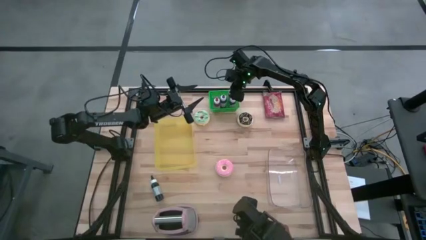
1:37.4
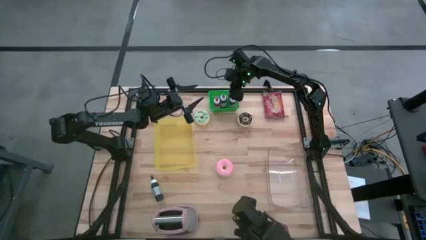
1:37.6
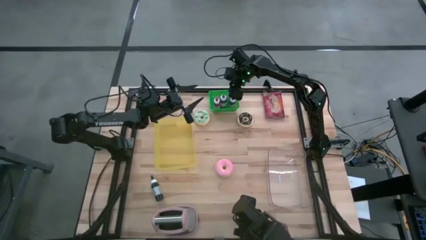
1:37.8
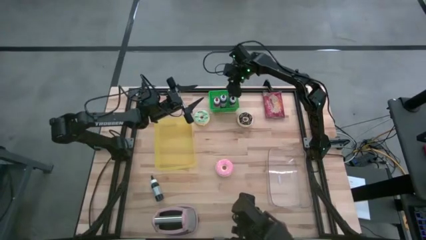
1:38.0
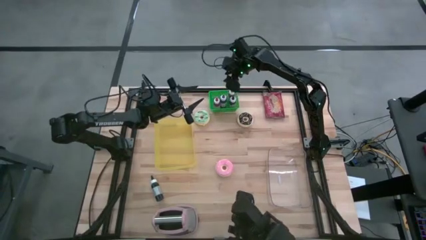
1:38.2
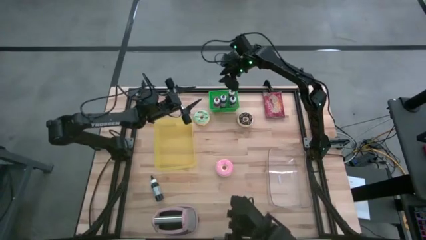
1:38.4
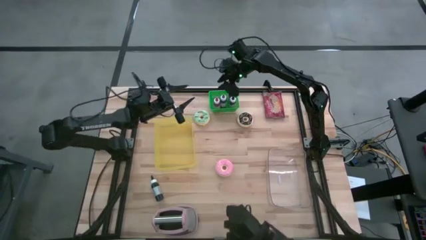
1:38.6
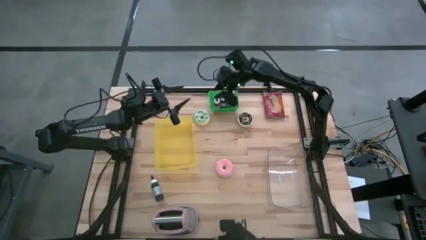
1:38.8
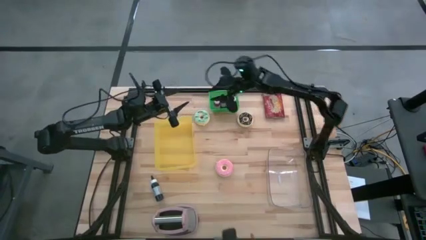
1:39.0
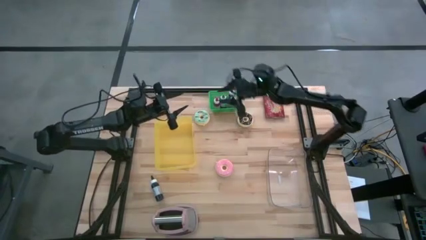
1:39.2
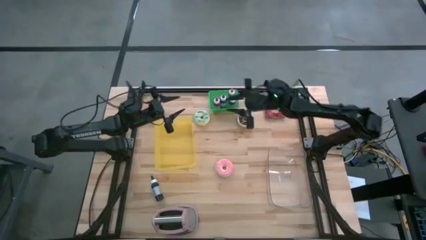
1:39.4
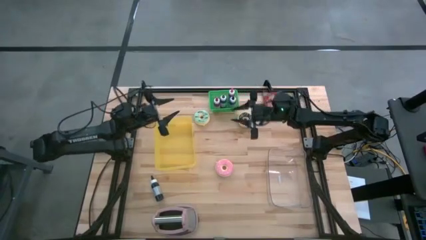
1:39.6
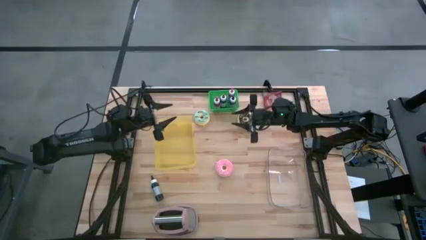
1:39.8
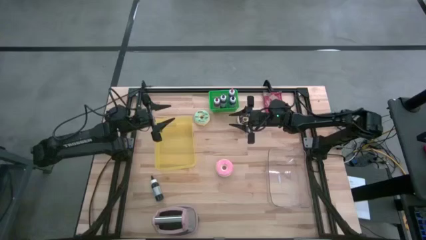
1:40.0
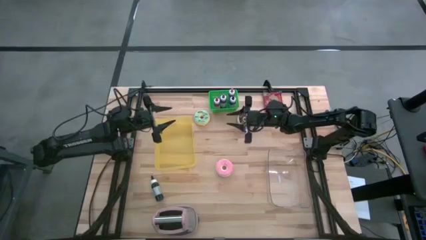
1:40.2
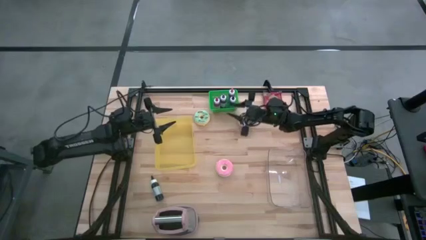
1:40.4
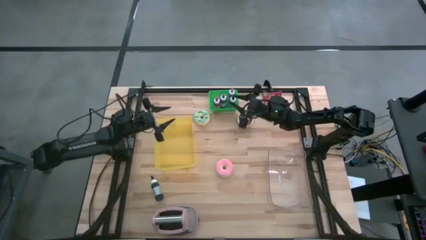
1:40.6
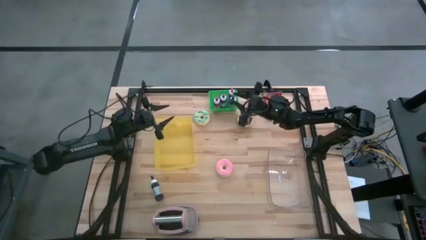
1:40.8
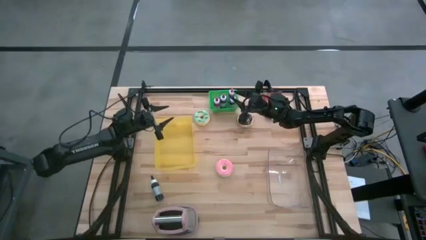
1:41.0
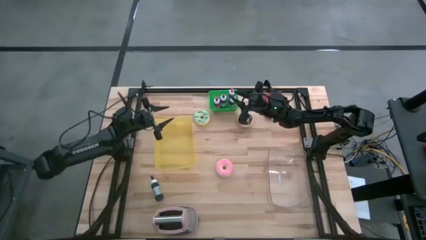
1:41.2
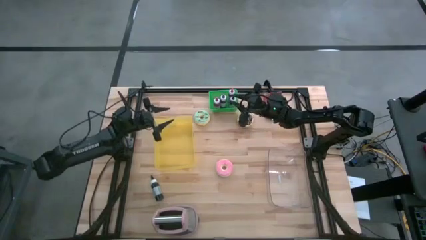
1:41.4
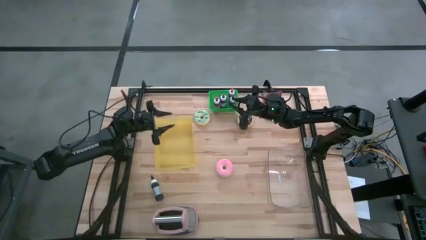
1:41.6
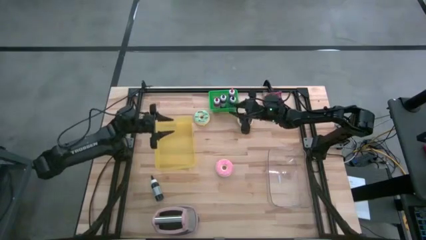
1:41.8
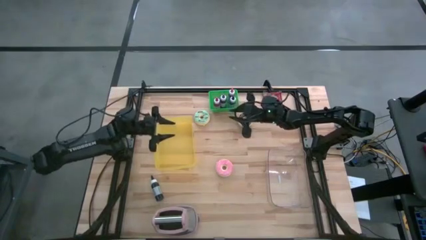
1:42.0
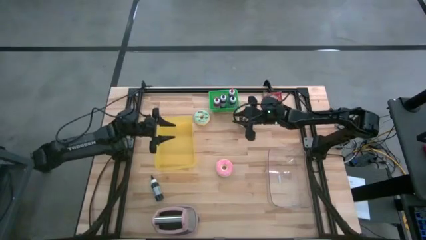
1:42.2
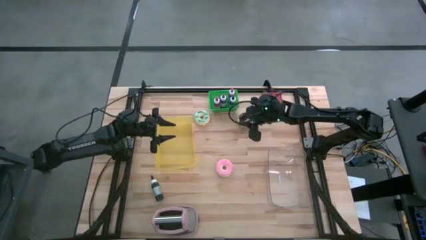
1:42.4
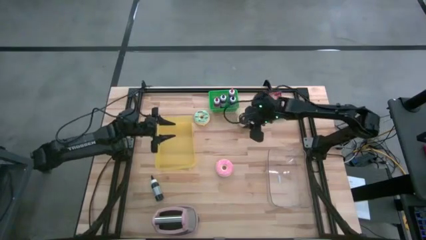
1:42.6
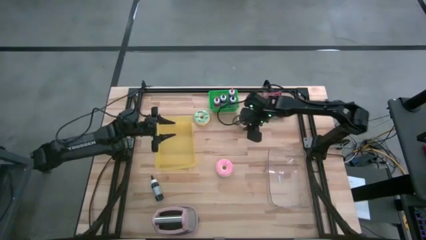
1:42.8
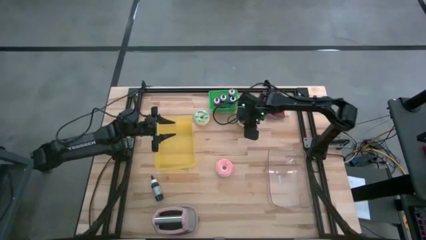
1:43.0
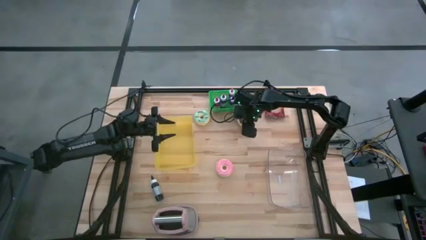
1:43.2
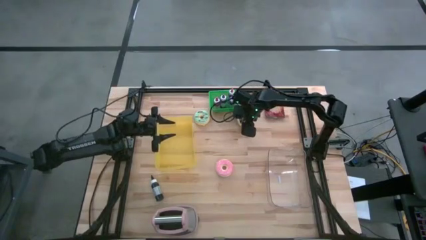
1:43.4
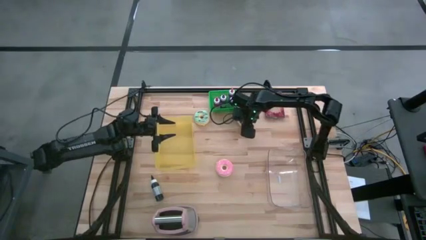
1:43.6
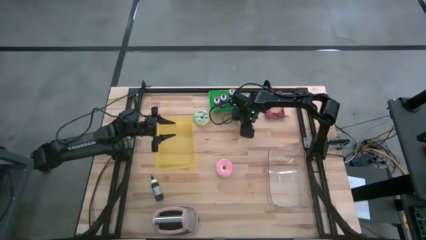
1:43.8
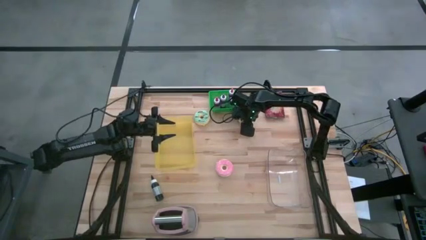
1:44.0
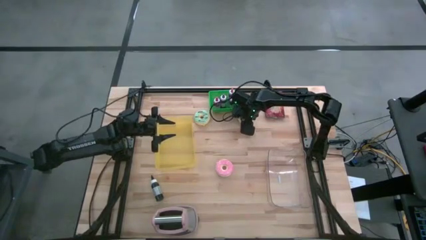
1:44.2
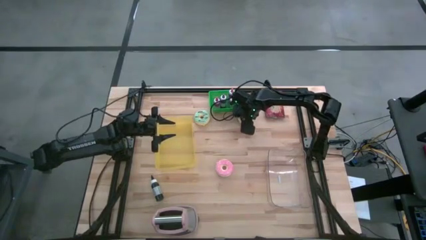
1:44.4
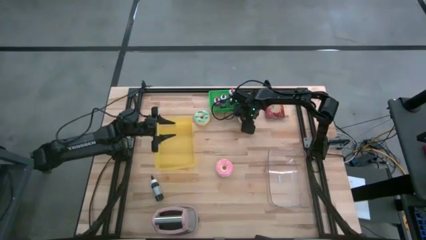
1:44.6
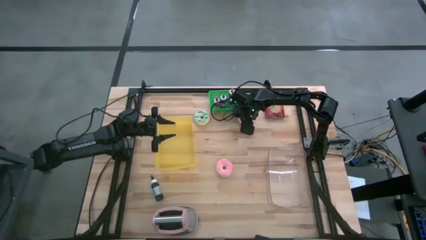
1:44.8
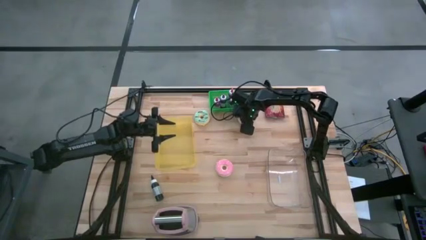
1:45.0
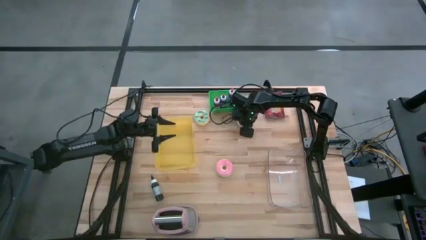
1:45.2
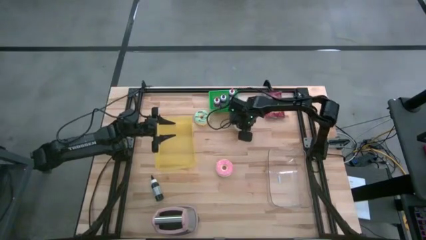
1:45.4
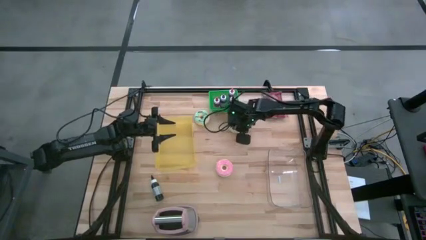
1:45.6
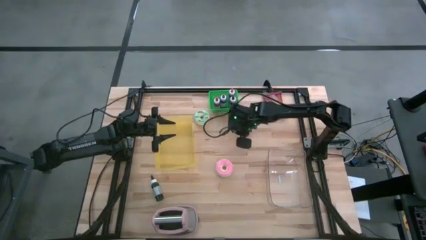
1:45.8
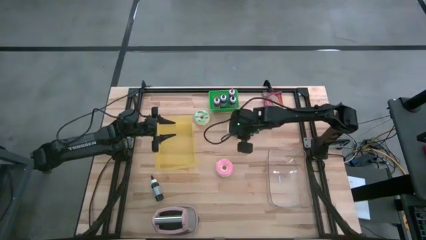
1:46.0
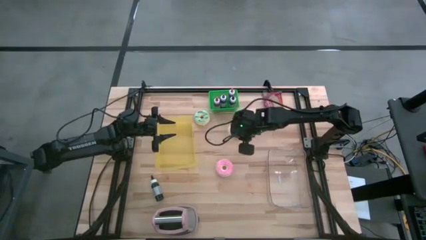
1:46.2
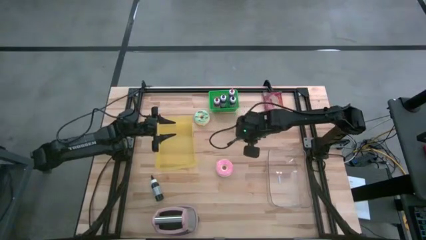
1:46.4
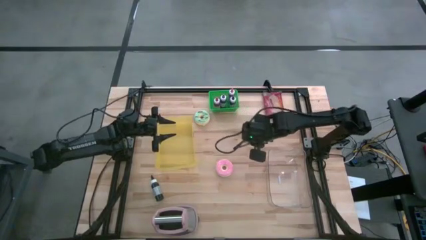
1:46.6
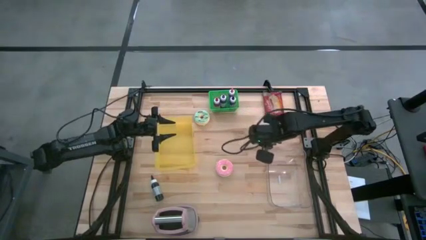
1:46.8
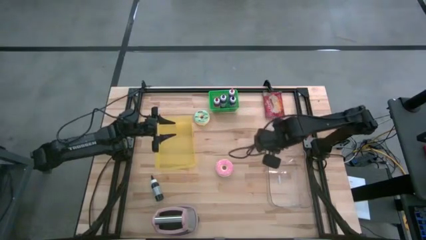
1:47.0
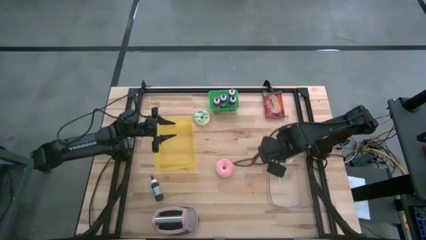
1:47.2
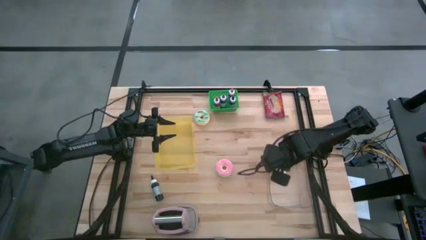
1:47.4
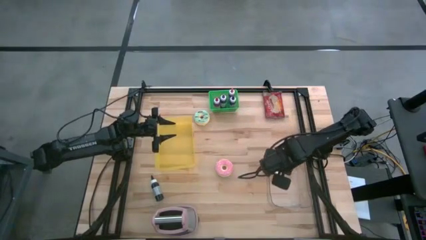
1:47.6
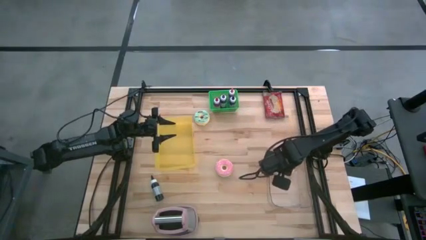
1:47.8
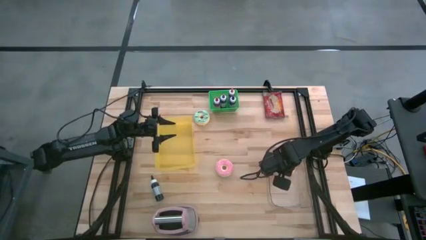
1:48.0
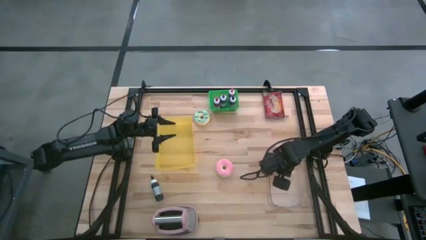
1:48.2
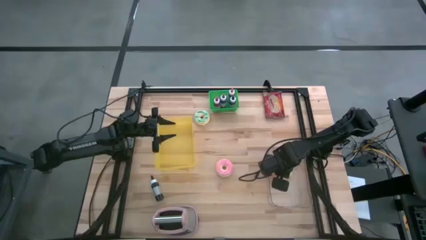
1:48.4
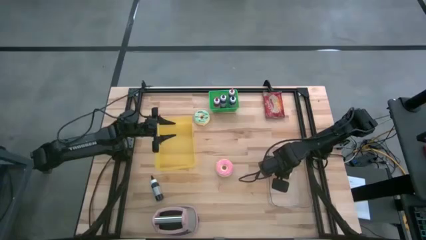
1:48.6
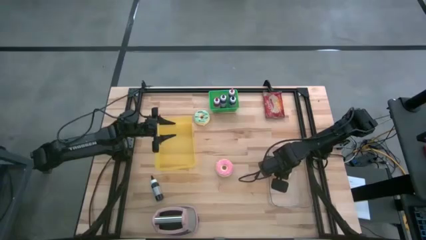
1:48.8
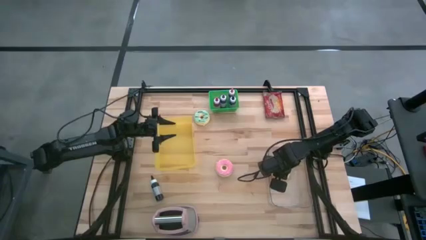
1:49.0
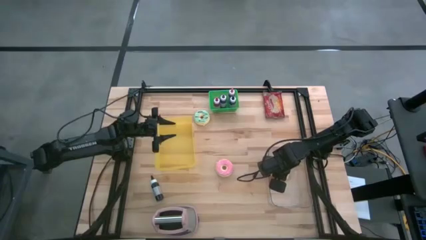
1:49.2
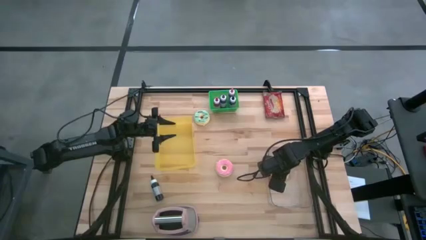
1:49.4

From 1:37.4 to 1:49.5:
Task: Pick & Place Food Item
Put the black donut into the transparent bin

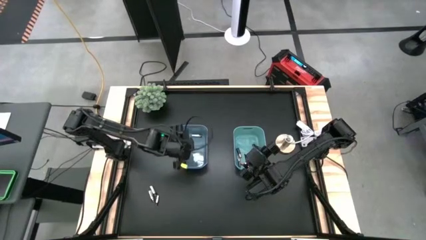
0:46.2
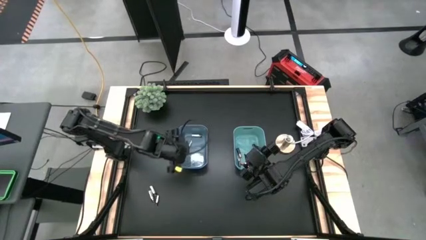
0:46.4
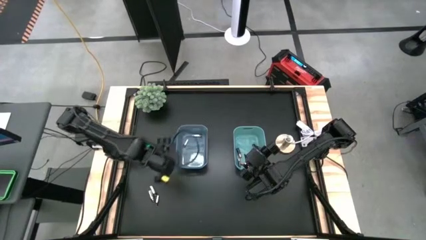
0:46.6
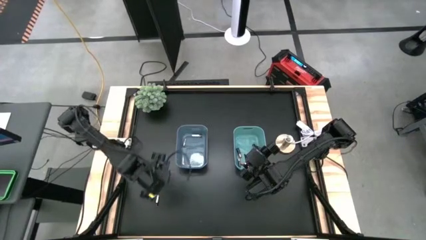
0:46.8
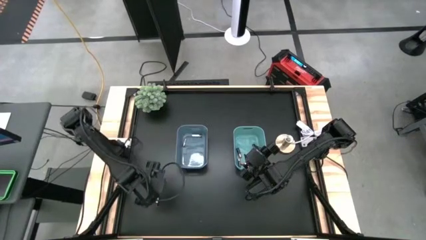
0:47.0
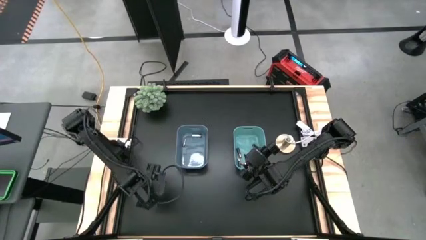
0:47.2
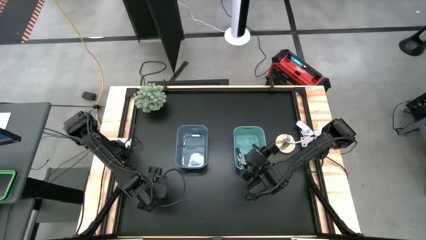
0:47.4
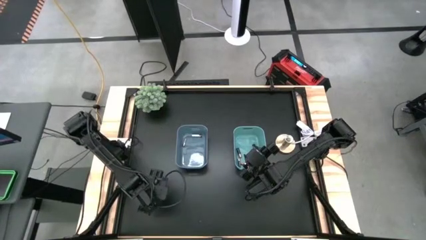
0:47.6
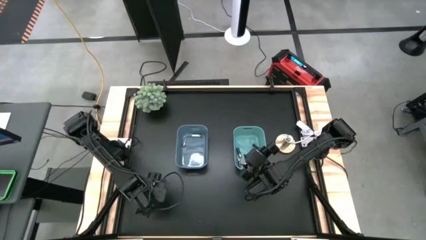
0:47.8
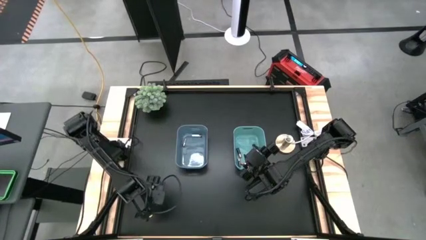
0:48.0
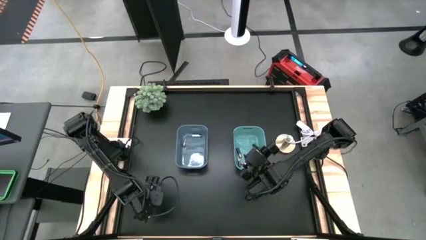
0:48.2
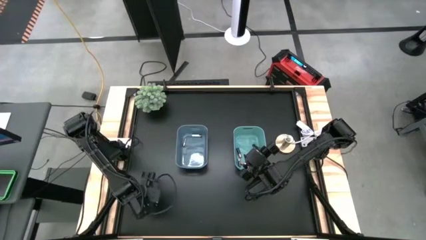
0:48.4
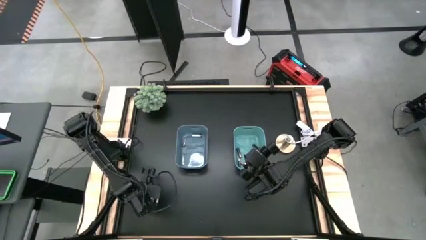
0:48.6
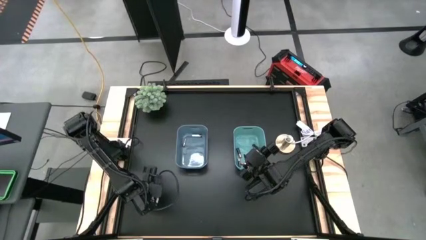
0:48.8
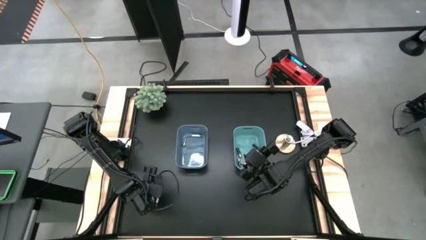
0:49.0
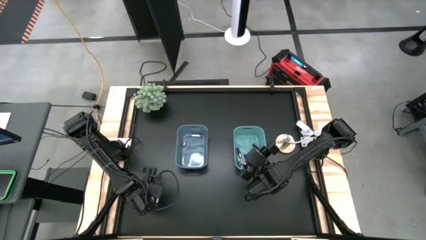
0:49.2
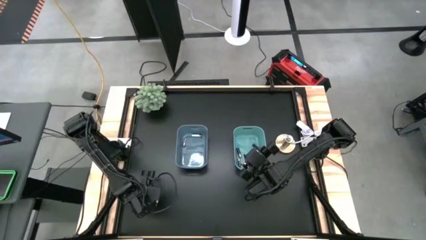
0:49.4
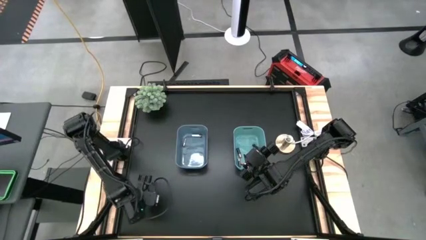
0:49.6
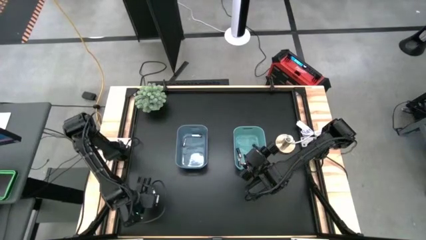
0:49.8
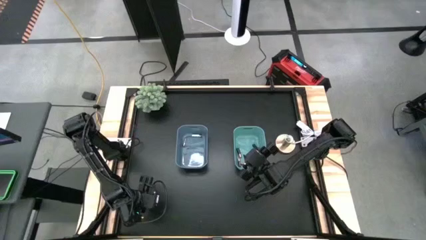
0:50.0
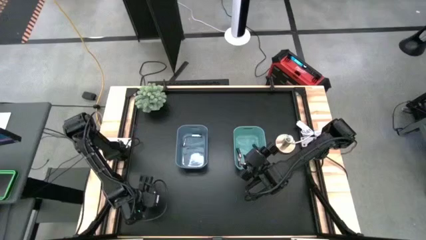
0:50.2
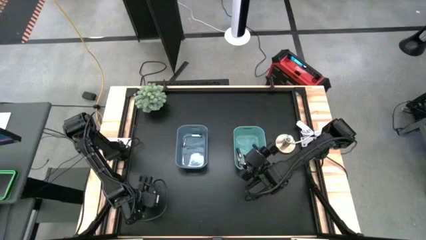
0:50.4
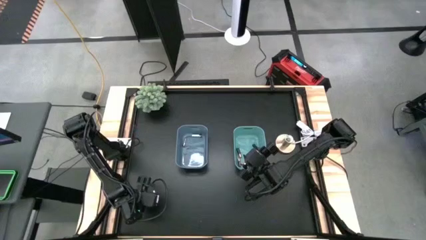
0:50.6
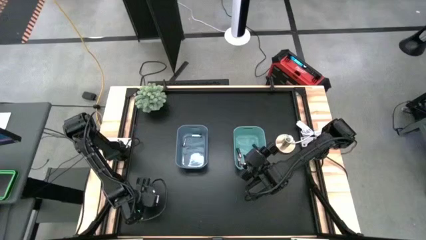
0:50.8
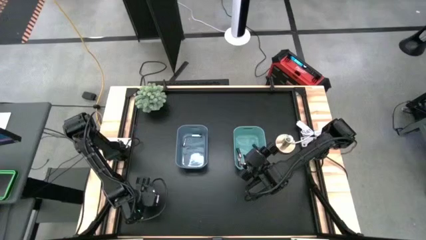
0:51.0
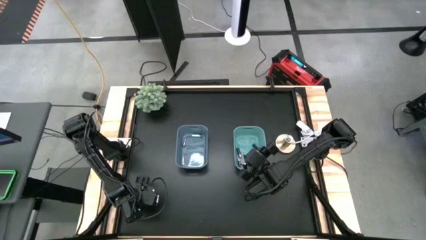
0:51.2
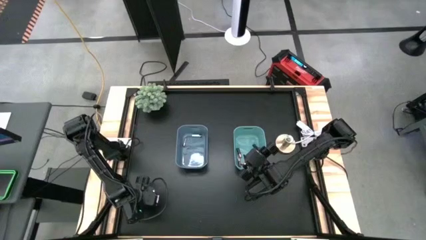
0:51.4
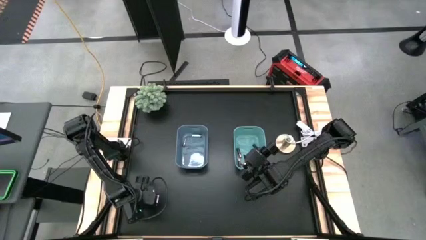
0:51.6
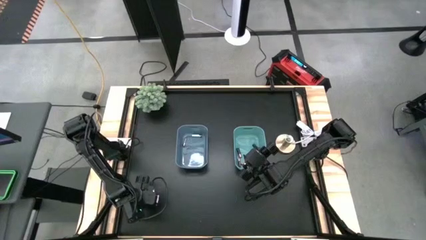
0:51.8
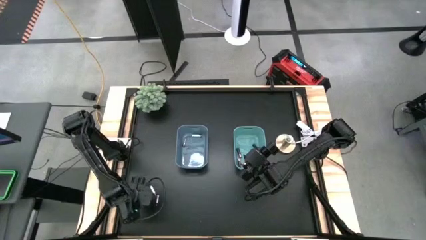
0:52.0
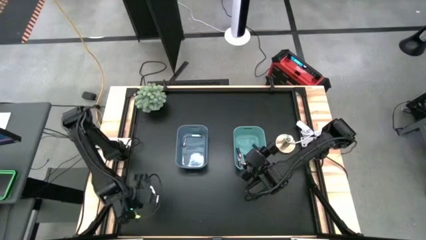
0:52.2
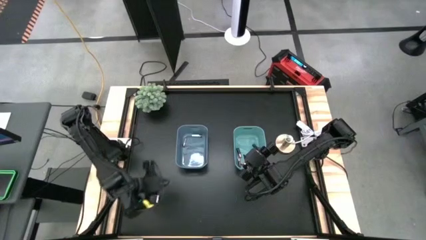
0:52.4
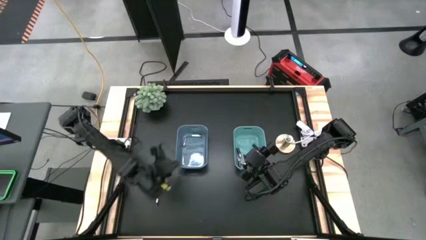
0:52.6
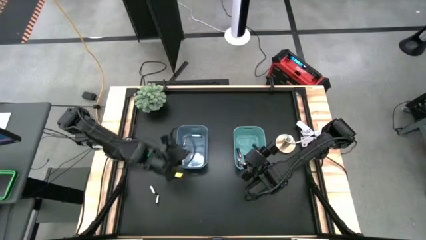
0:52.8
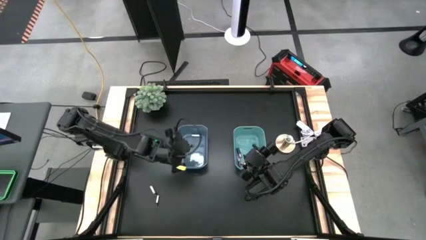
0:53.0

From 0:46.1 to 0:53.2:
Task: Sort batteries
Put the big silver battery into the blue bin
